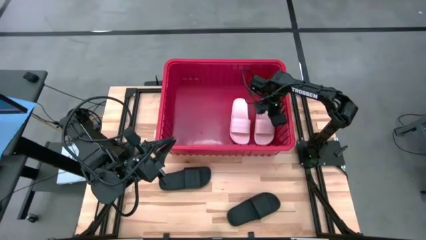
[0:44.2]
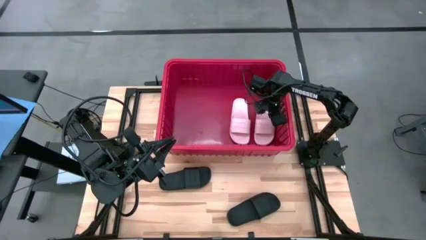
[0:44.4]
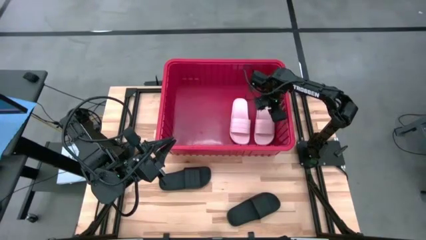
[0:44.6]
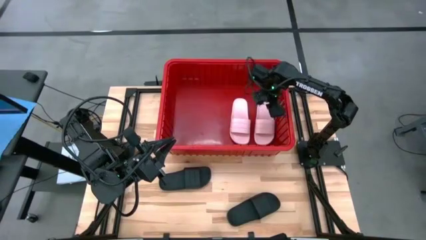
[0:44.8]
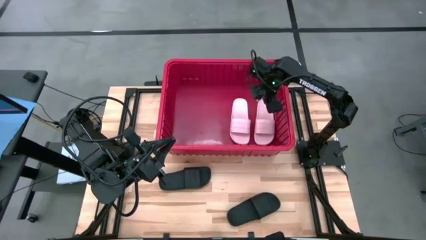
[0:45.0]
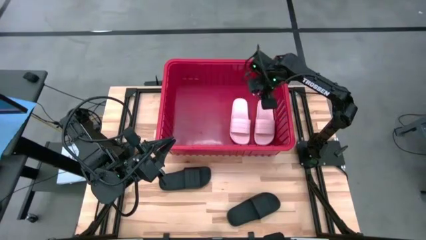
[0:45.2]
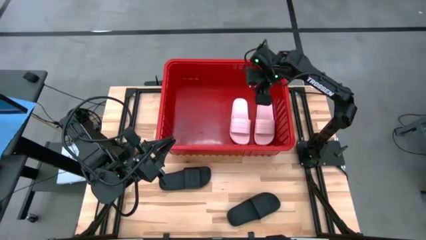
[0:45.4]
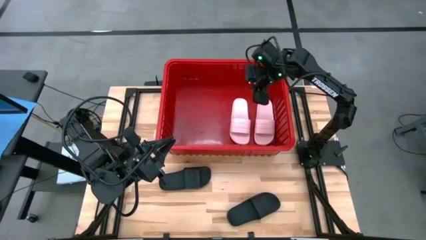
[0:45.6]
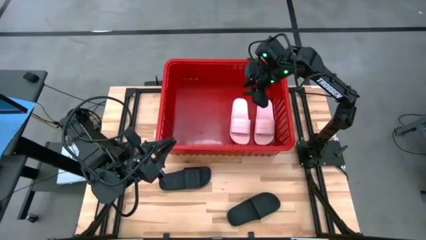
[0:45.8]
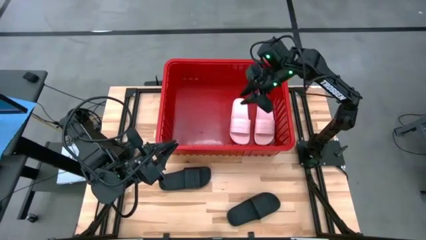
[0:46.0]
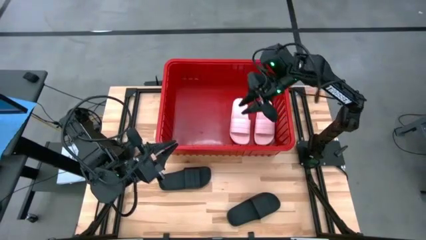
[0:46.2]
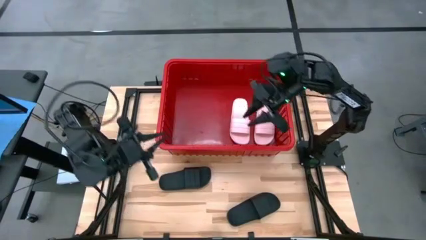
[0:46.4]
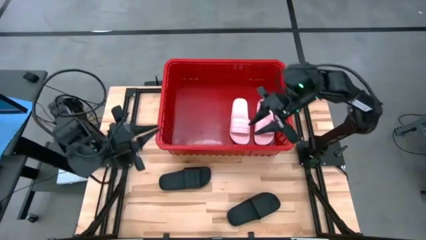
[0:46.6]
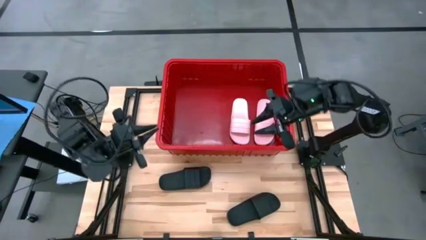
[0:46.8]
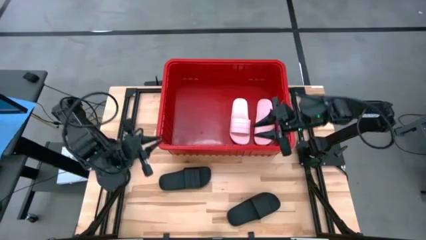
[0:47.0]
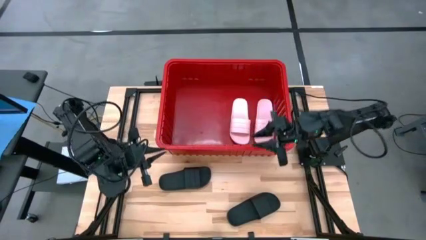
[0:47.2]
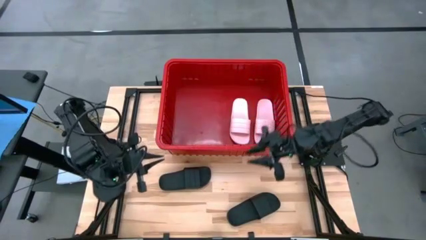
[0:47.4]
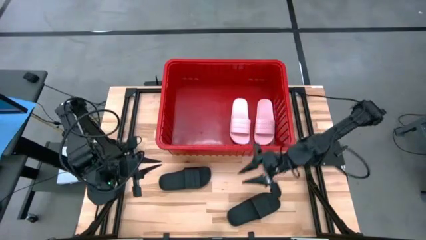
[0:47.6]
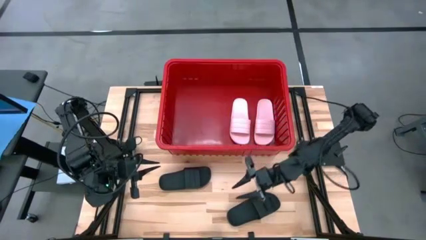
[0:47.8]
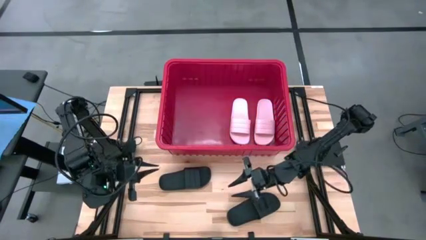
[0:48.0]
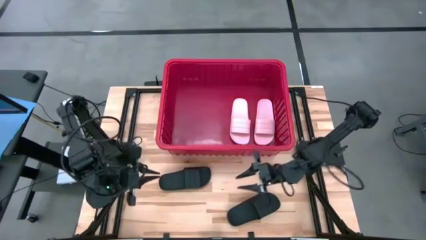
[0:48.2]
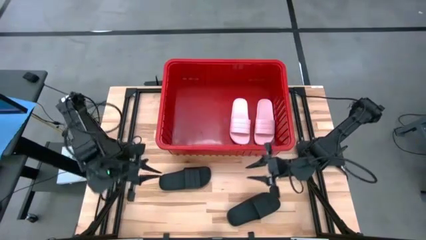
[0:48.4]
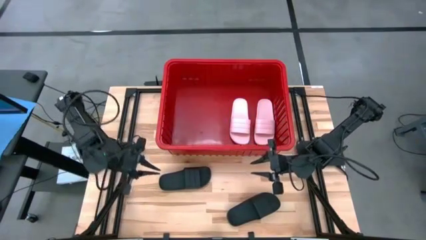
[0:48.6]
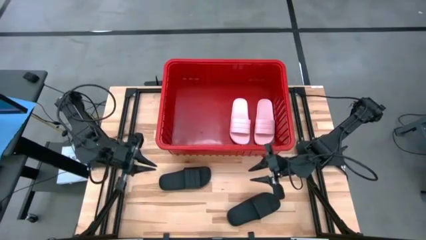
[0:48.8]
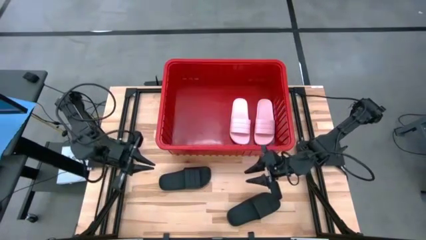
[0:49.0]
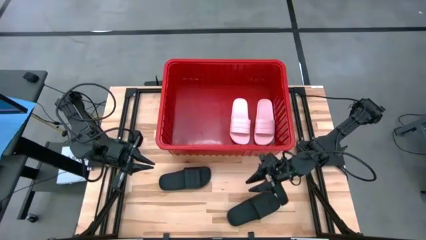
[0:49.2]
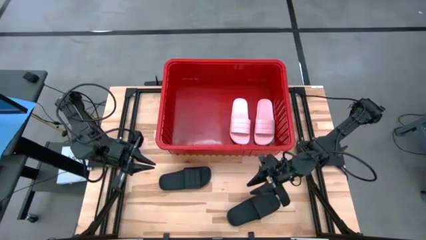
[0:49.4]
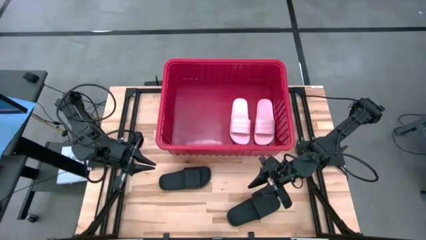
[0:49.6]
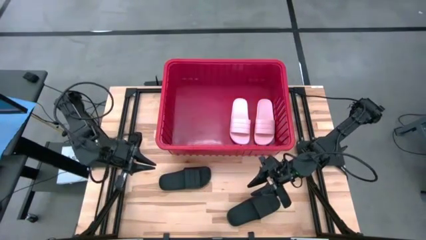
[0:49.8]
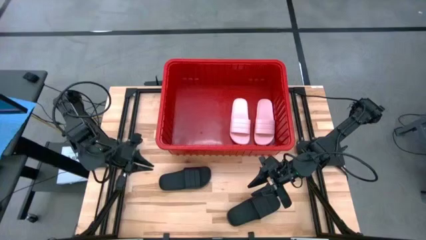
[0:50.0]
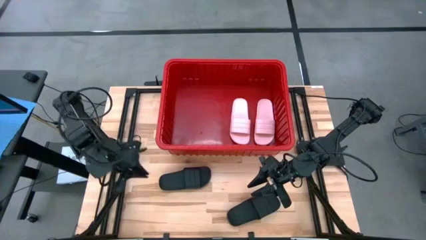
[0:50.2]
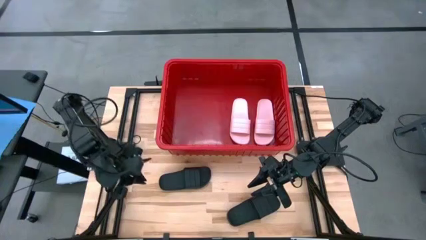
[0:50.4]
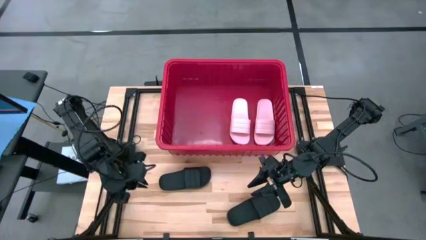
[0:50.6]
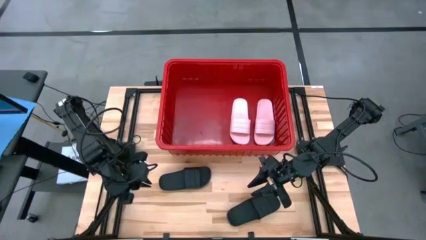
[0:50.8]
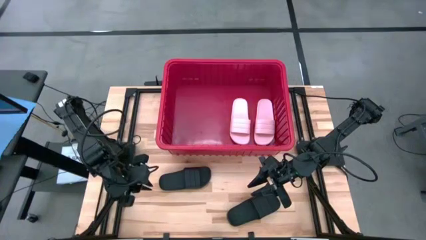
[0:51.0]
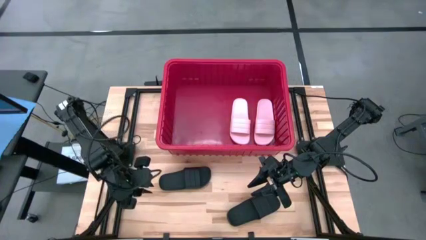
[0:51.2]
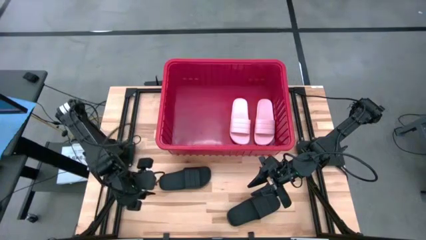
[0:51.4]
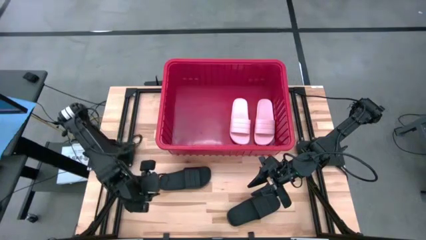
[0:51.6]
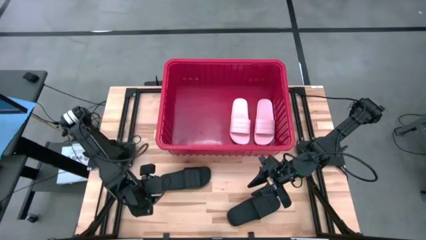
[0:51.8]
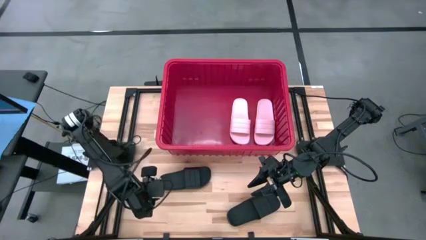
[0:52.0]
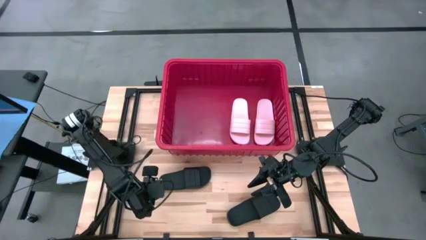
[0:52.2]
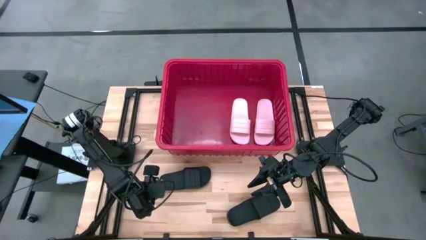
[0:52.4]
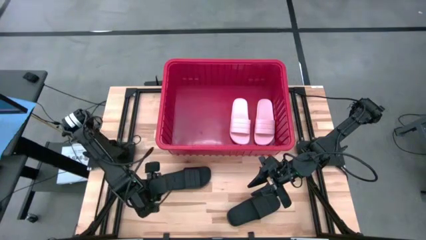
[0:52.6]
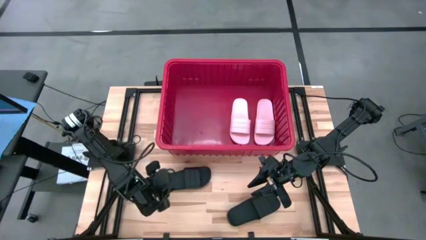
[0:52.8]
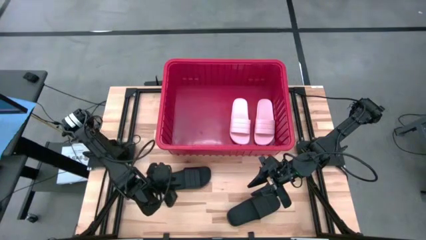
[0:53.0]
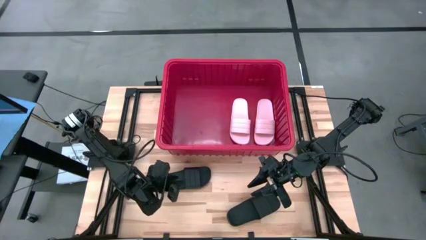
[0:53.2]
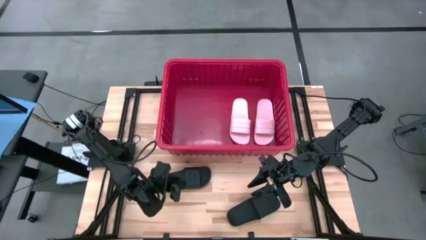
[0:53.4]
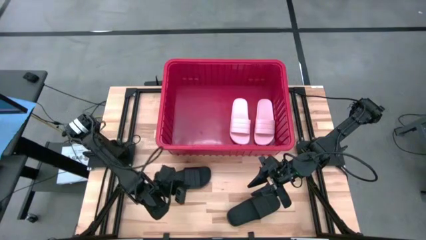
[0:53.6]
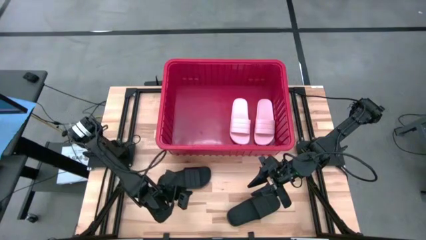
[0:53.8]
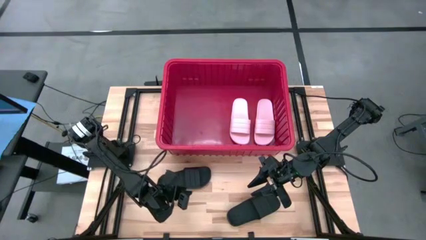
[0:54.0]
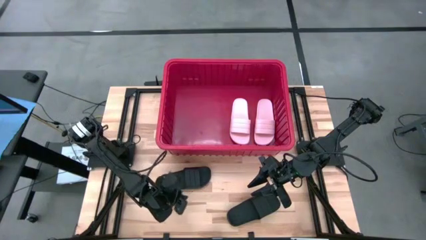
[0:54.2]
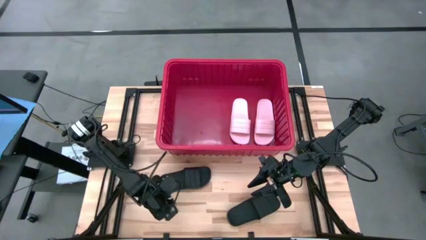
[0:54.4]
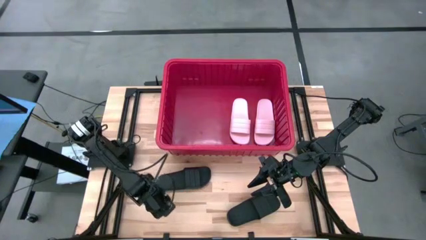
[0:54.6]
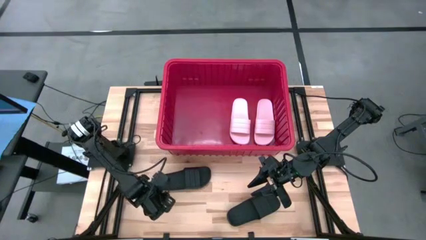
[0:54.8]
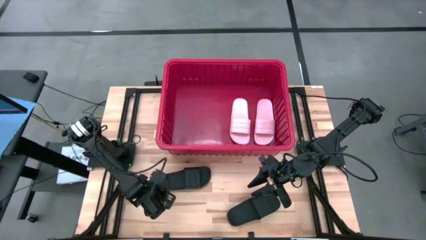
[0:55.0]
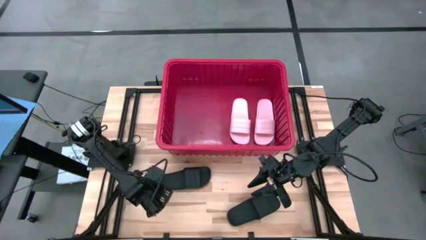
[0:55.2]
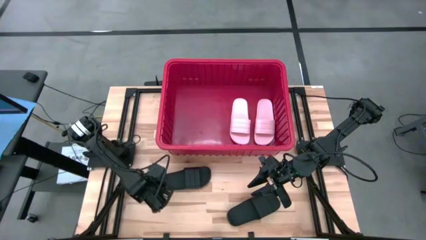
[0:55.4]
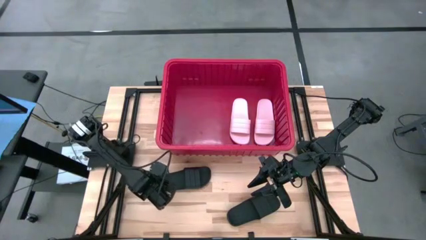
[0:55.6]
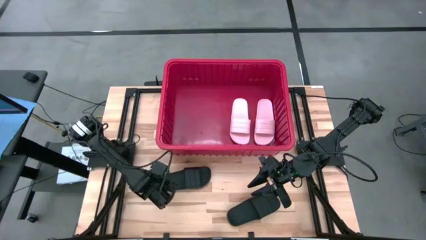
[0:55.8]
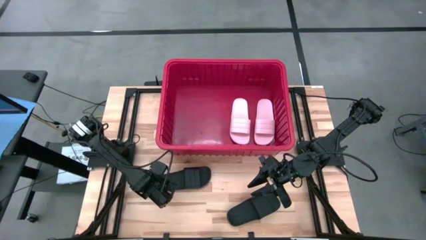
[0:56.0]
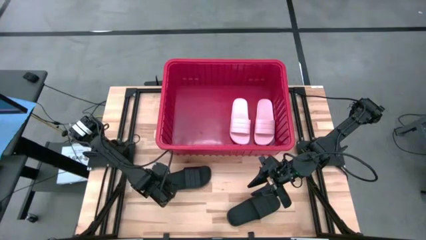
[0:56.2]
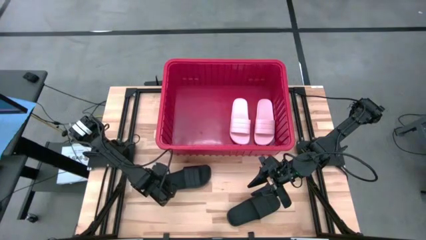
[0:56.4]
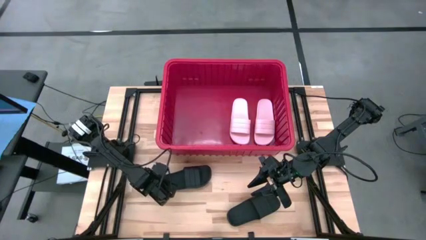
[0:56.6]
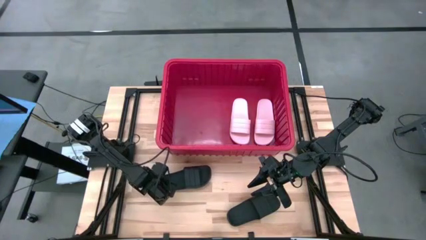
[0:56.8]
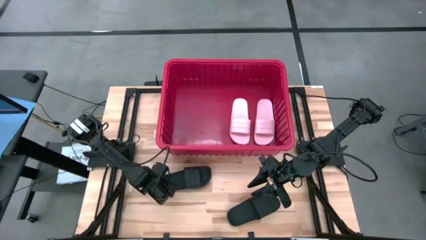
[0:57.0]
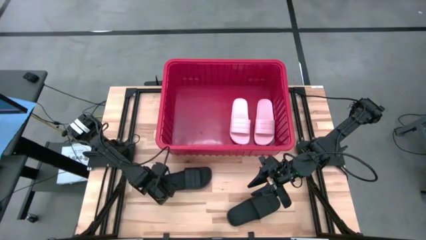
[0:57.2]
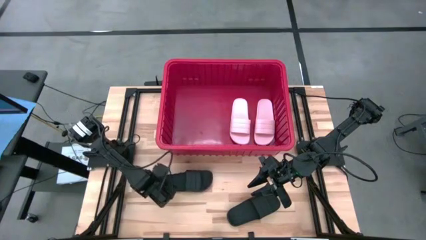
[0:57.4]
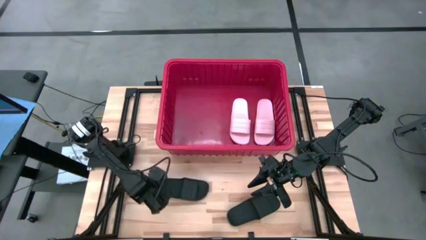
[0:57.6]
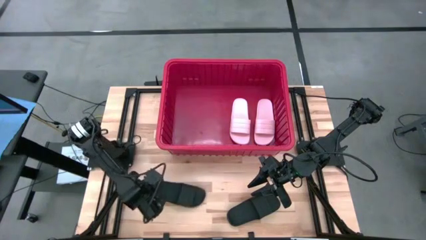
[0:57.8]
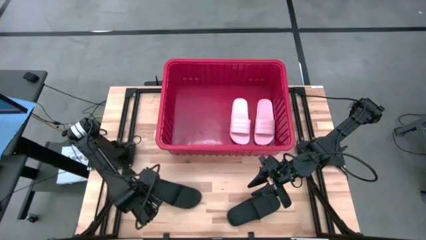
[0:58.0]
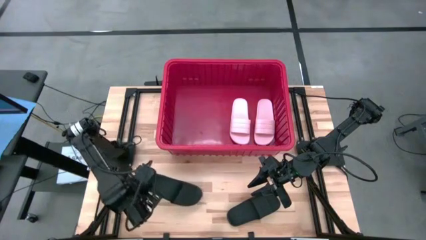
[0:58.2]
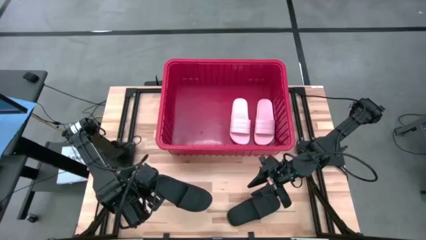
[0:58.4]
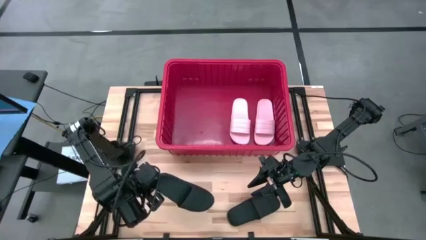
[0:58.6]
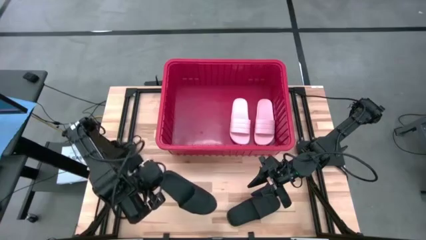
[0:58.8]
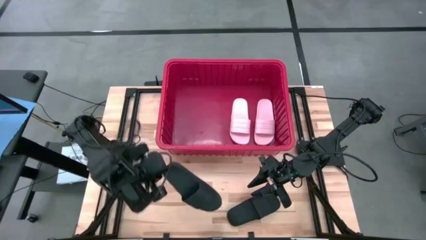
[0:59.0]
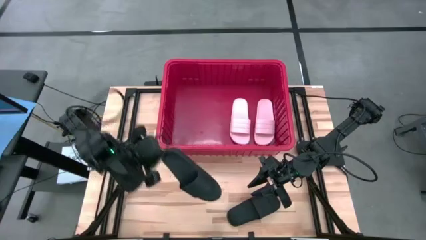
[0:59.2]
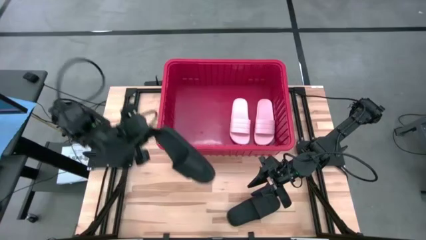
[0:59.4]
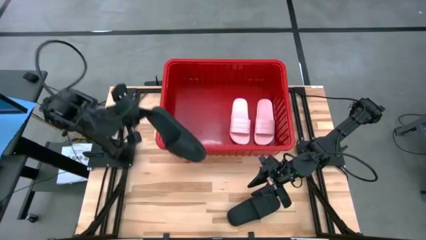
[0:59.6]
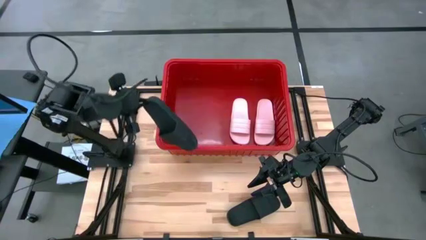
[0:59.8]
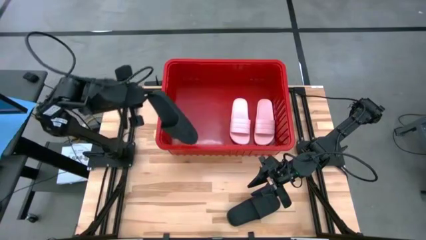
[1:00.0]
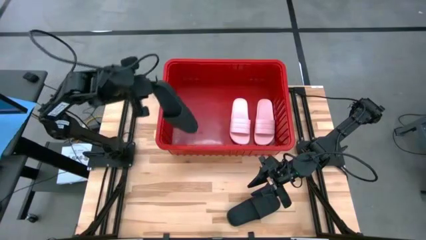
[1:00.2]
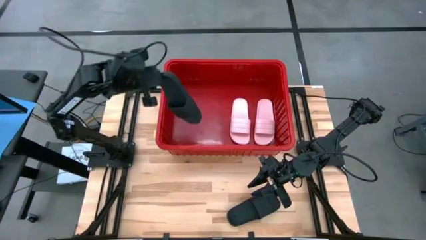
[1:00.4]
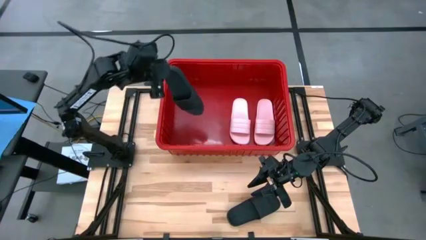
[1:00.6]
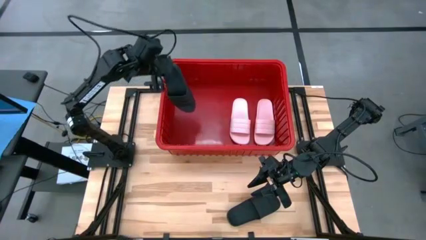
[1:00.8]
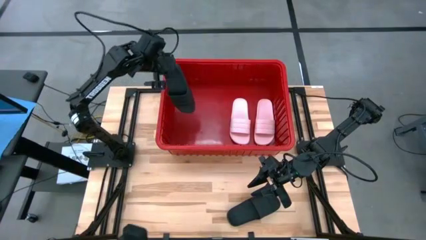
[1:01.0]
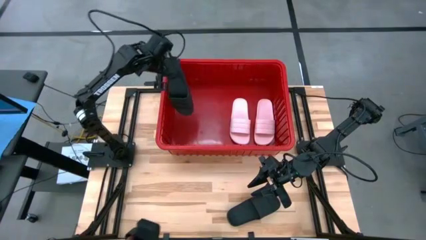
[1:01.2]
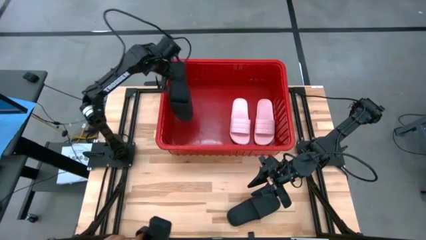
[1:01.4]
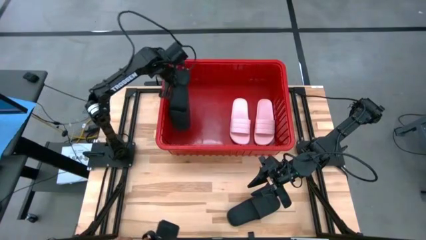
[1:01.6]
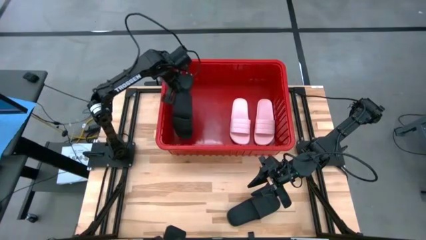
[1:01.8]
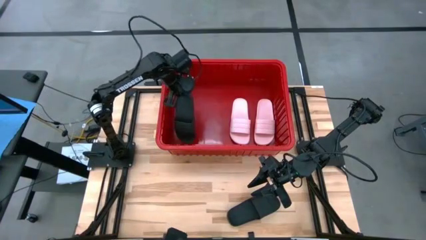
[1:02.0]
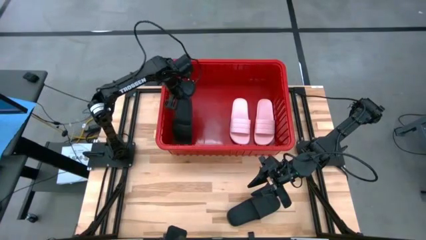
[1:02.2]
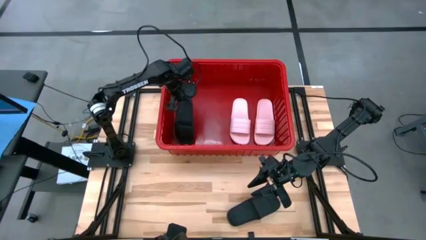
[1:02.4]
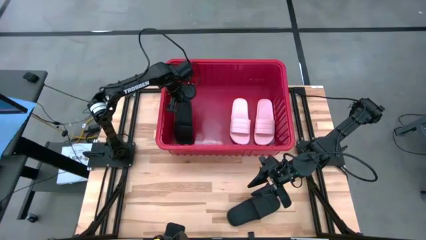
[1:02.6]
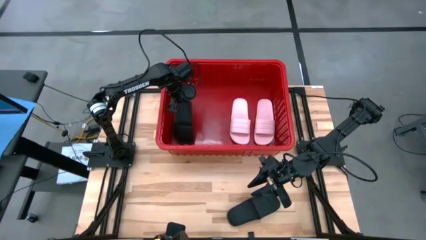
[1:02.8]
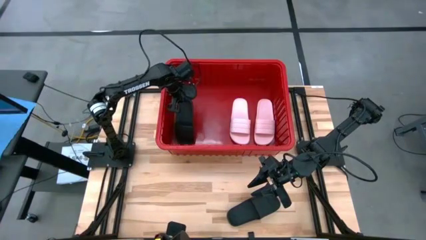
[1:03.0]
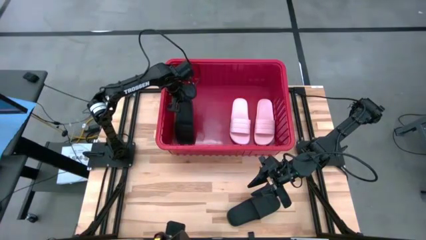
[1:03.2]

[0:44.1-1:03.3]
Task: Pick and place slides into bin
Put the left black slide into the bin
